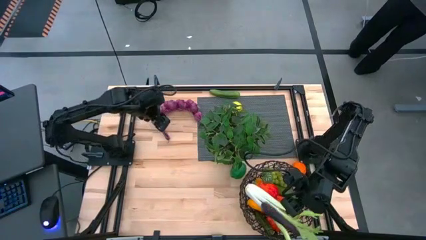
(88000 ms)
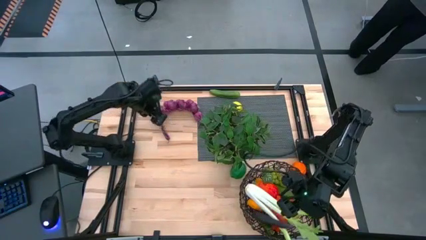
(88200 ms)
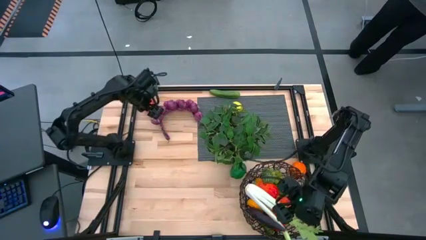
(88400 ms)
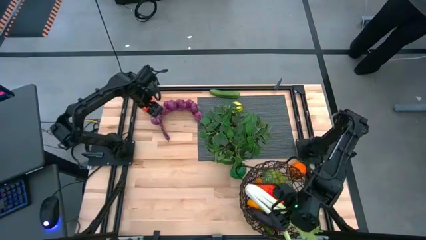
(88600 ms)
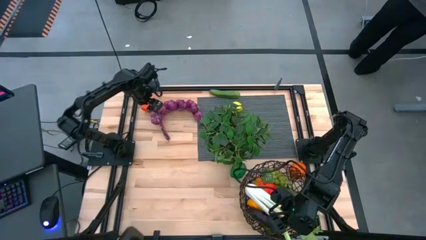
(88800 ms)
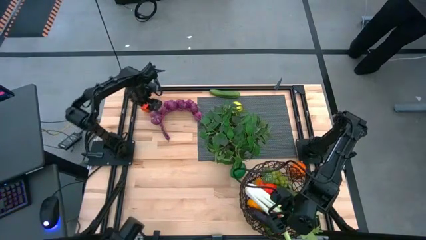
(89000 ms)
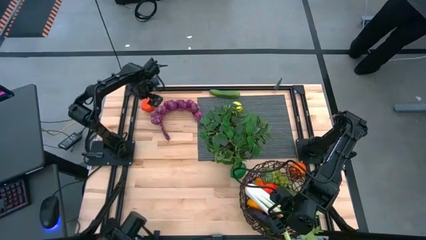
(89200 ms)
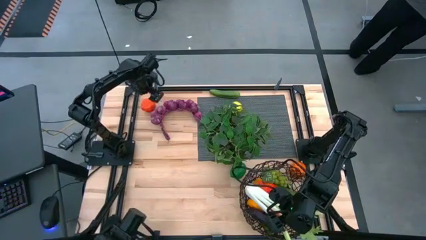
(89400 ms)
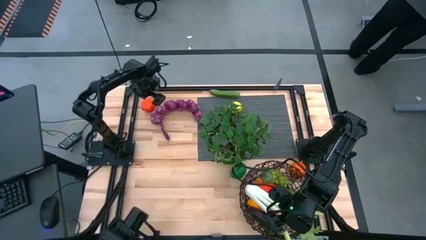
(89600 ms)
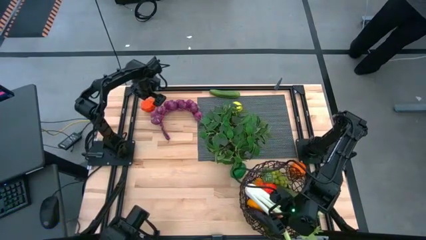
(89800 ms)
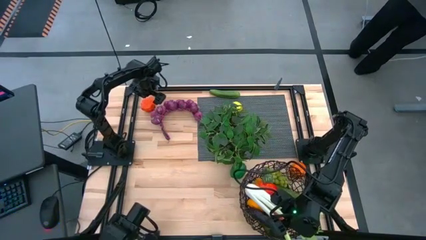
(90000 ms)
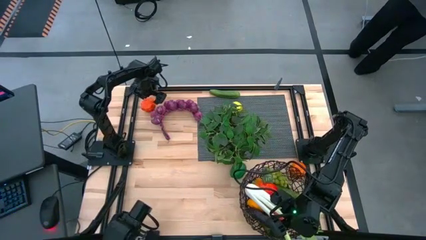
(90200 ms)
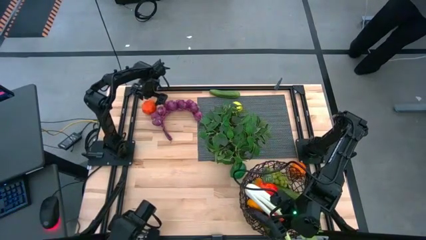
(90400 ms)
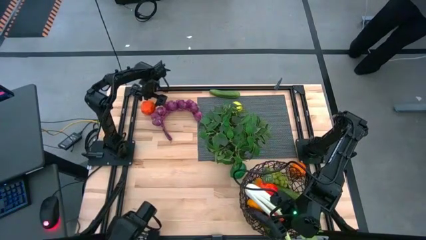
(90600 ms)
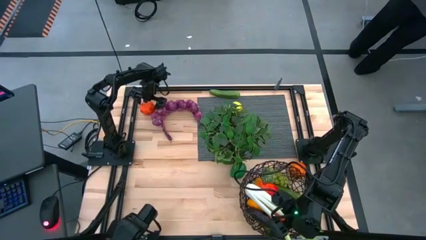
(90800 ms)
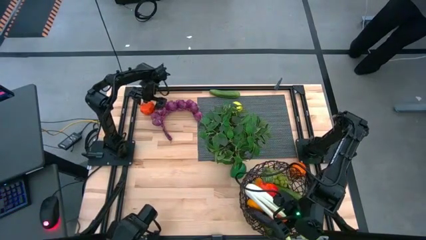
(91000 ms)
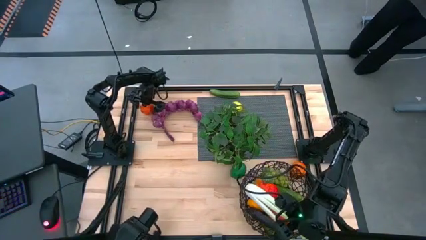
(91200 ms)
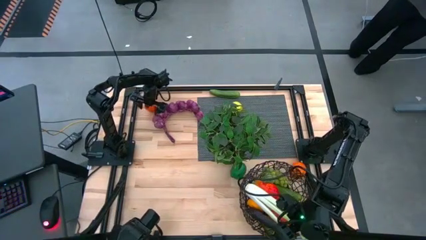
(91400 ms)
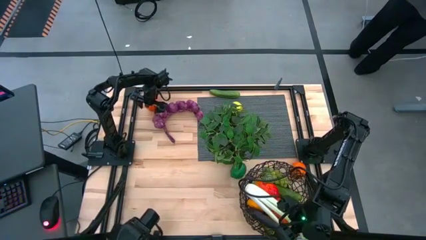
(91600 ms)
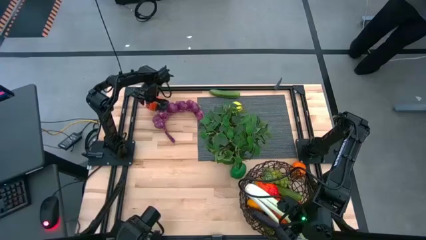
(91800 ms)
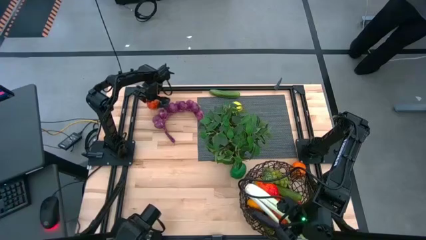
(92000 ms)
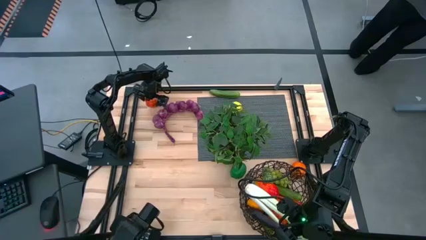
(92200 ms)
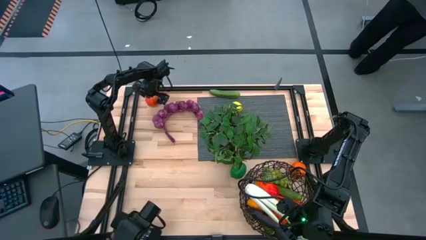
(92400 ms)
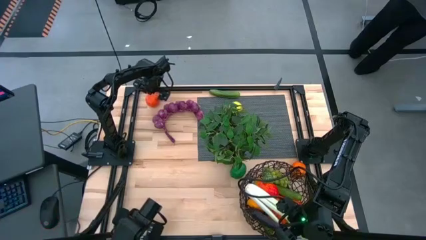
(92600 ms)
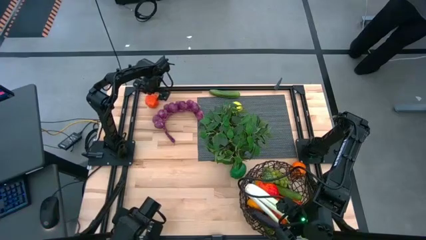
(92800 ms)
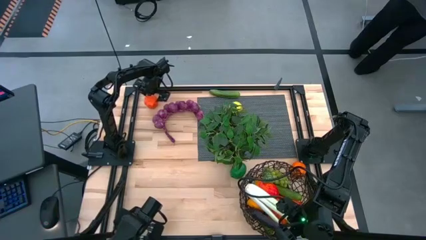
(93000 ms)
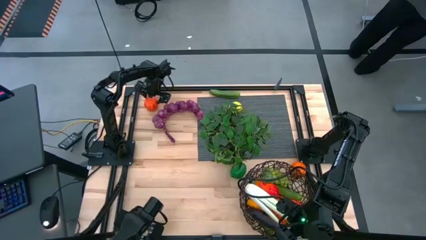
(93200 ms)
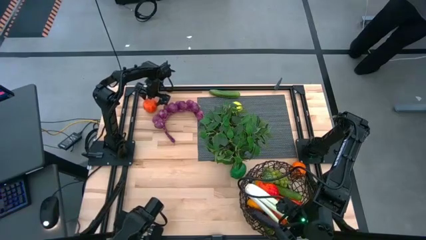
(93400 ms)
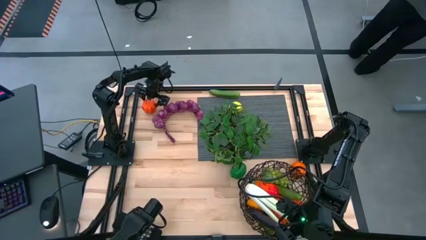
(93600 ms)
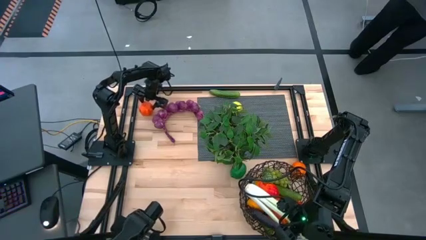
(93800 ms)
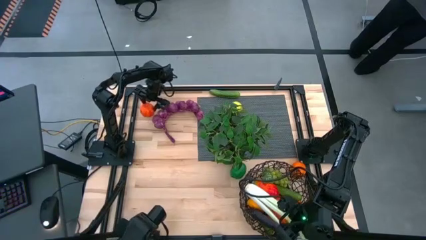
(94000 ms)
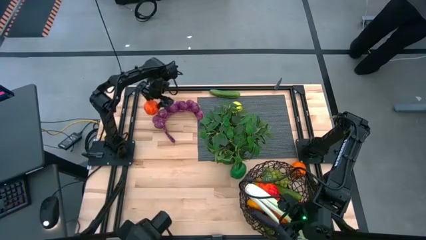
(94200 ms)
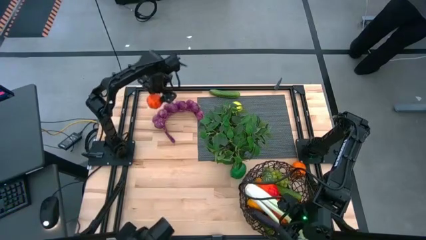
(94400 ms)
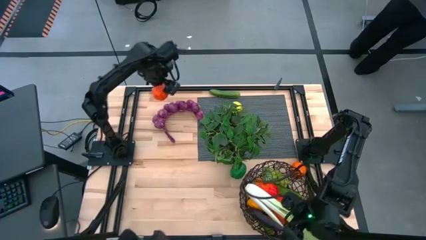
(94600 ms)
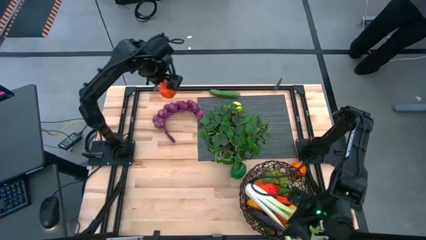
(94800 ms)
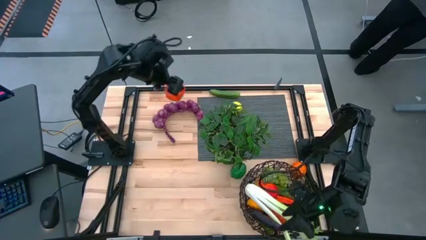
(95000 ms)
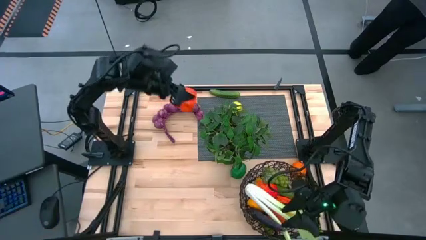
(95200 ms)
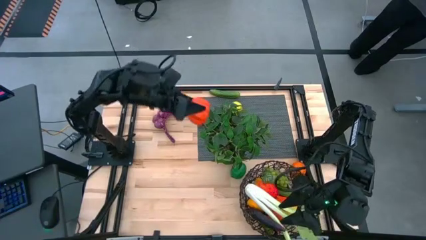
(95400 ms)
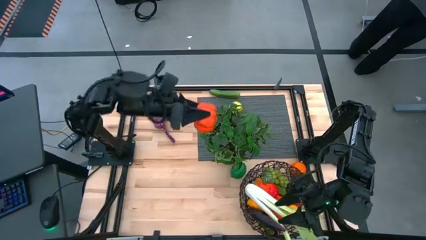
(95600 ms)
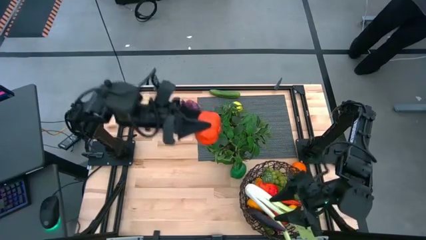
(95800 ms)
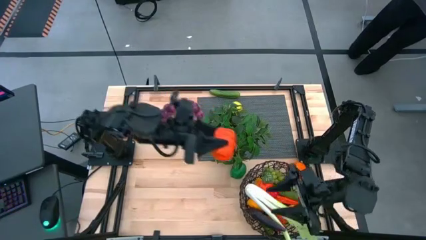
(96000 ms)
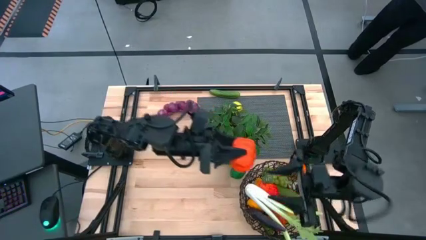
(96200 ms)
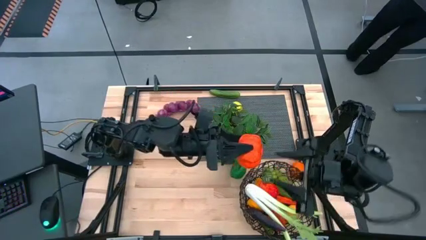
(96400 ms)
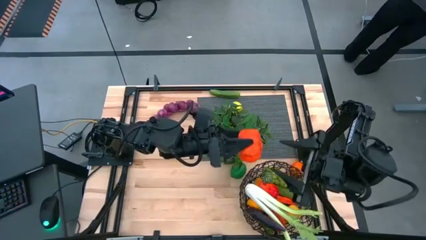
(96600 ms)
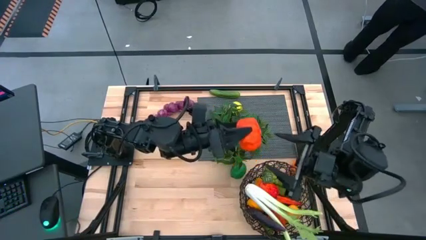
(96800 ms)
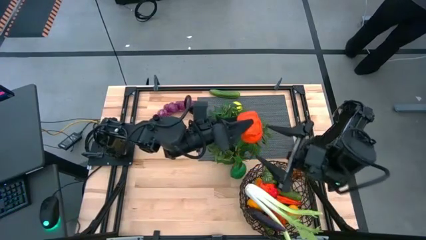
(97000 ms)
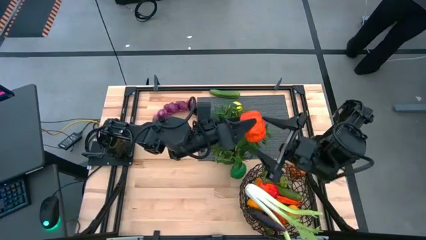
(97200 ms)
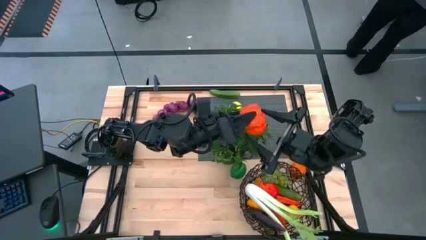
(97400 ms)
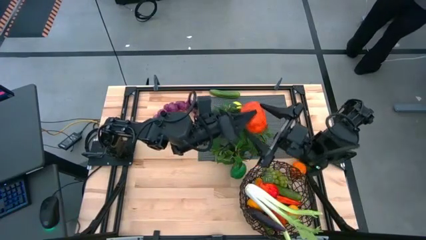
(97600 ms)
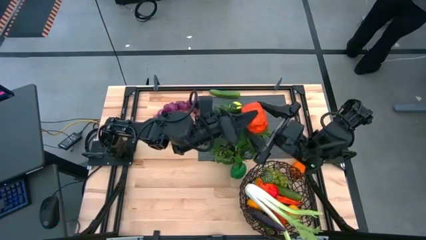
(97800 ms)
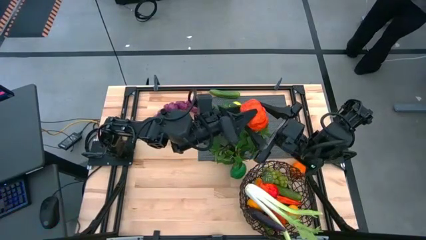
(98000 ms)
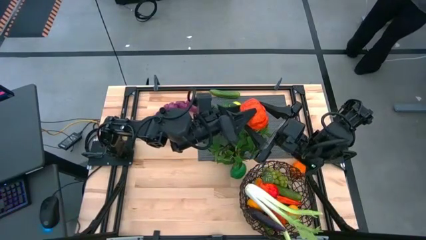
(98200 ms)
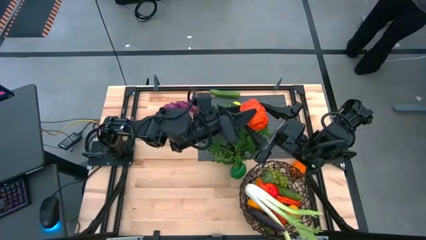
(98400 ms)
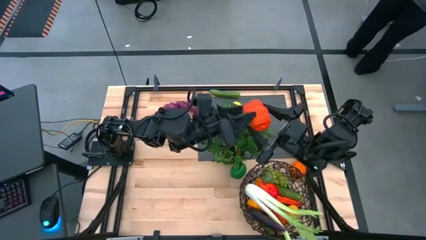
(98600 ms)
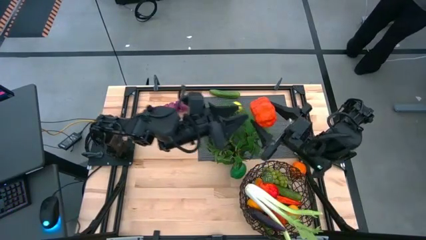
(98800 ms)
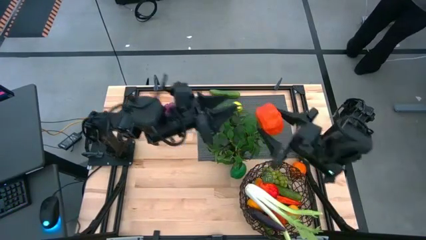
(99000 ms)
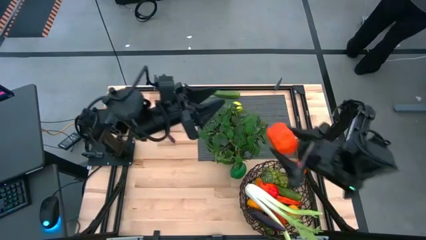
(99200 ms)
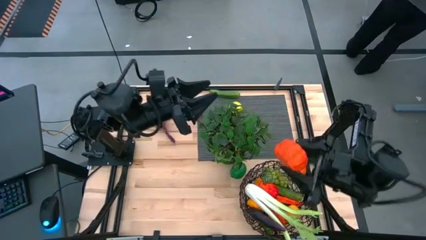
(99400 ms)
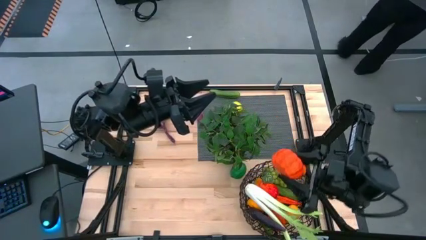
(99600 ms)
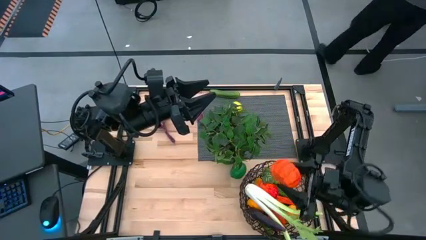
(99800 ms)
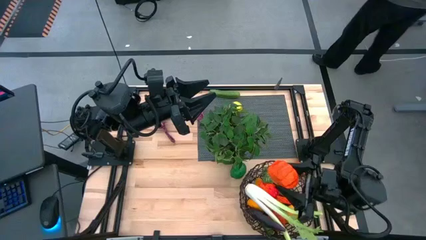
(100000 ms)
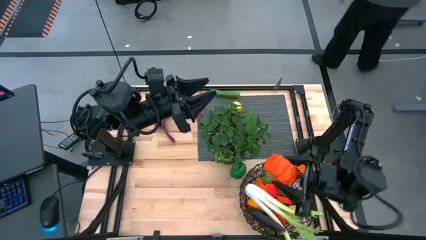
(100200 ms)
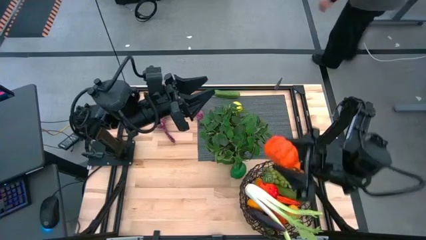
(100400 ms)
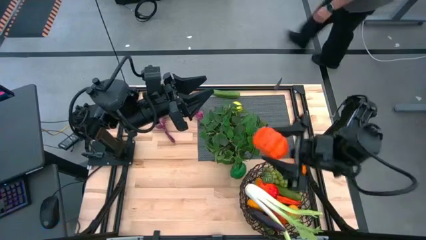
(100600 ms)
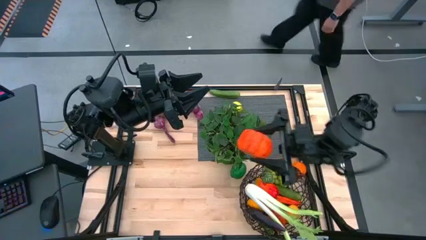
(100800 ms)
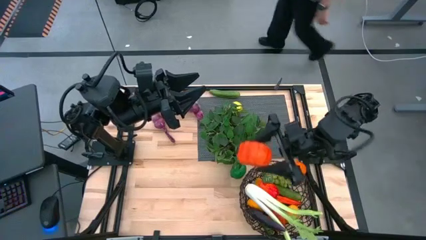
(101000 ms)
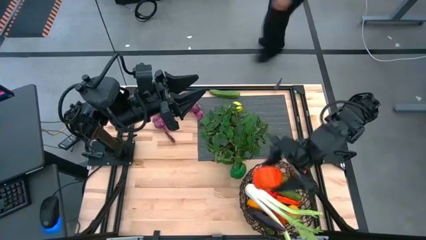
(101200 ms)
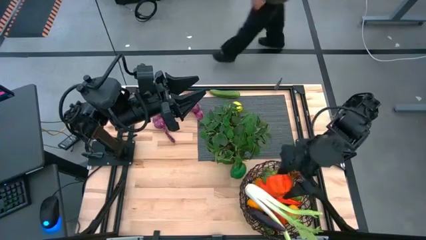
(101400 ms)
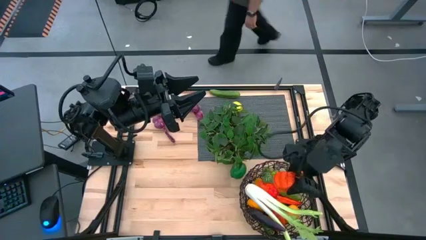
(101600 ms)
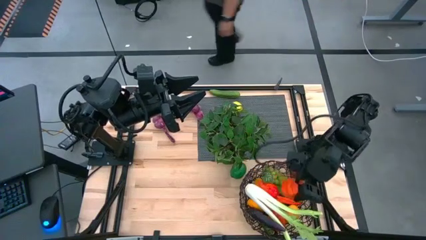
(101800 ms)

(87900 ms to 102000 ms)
Task: Build produce basket
Put the orange squash into the brown wire basket

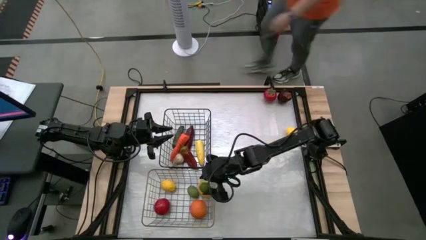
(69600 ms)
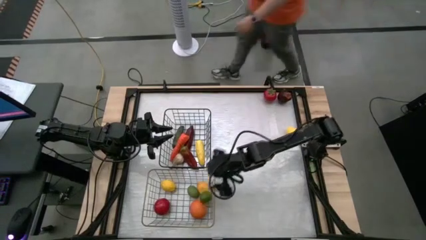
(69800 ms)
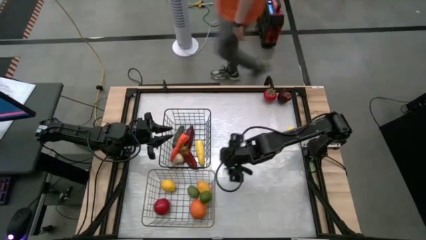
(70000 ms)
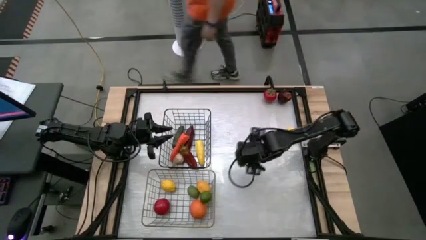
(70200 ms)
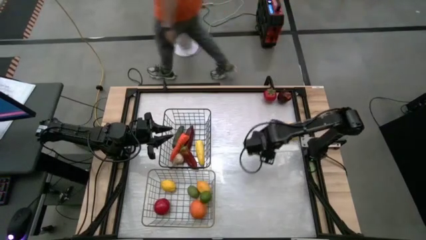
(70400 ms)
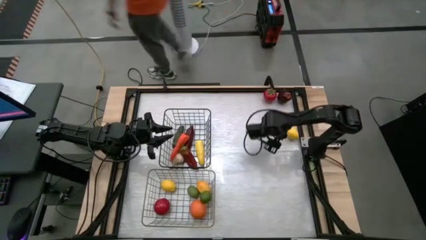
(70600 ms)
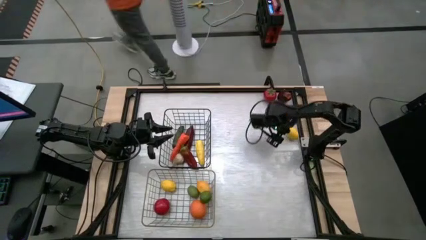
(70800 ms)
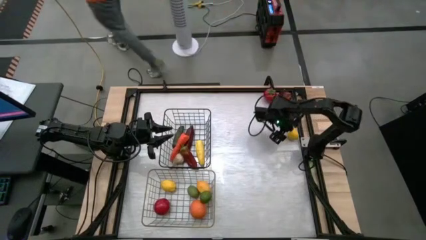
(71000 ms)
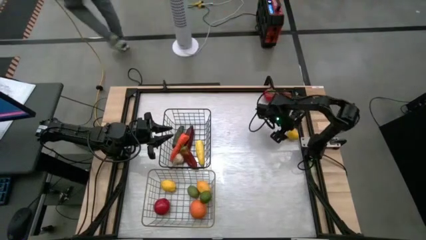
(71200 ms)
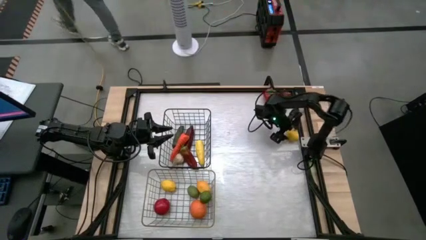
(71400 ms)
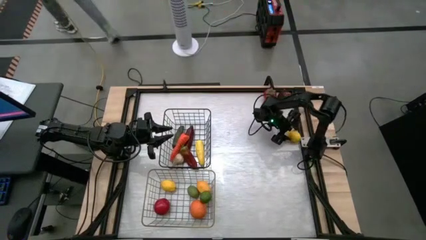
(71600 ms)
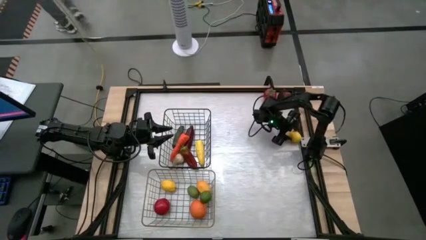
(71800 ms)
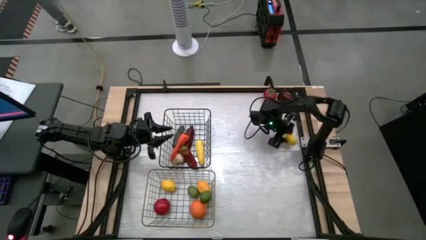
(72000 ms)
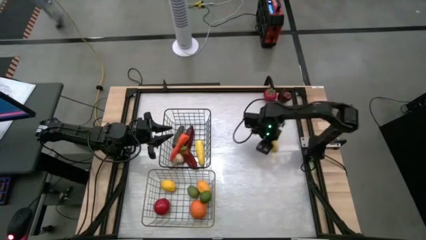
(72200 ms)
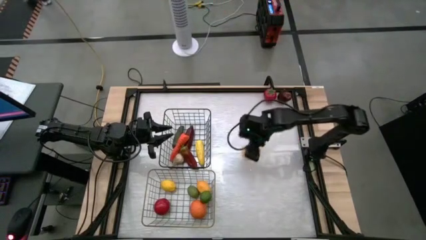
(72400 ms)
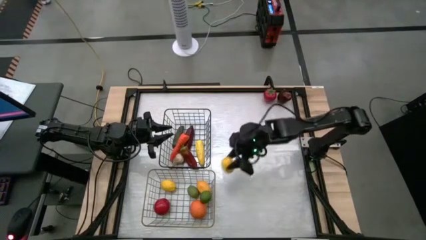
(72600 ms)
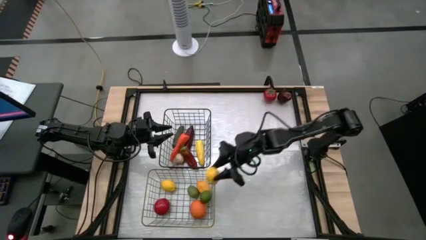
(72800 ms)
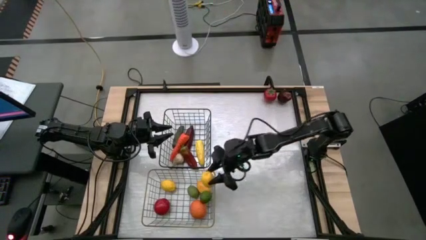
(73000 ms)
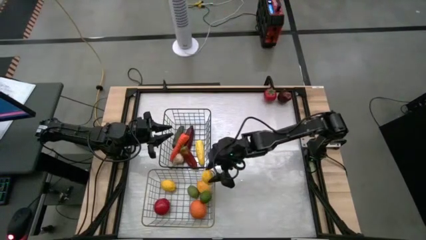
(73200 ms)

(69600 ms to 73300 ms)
Task: Sort produce into baskets
Put the lemon into the silver wire basket
